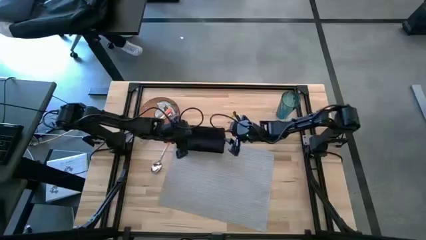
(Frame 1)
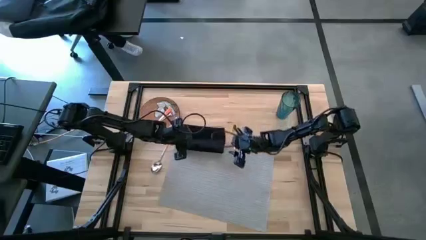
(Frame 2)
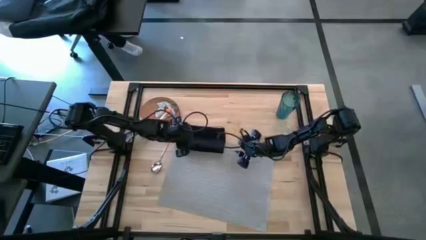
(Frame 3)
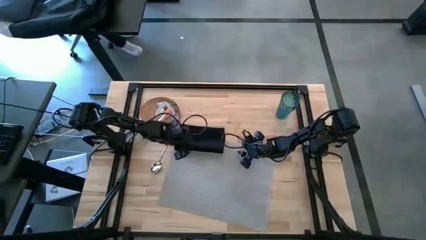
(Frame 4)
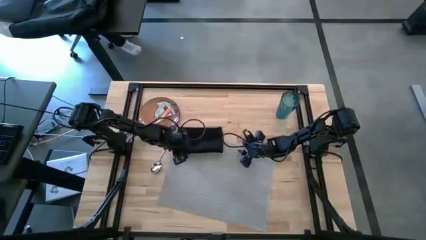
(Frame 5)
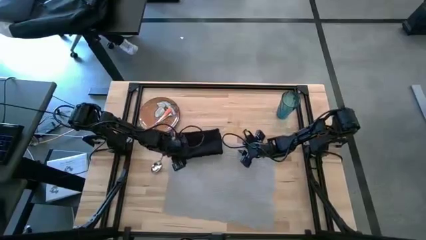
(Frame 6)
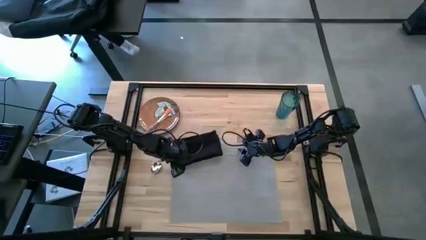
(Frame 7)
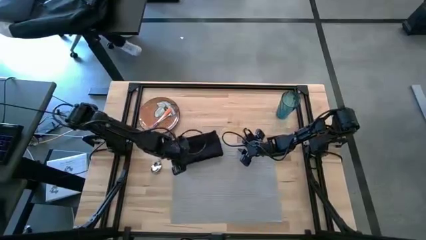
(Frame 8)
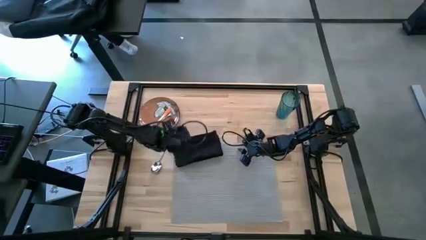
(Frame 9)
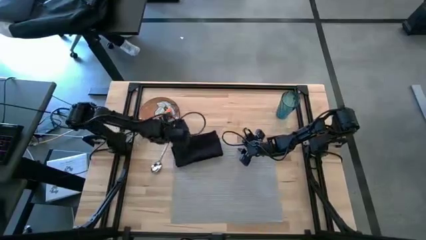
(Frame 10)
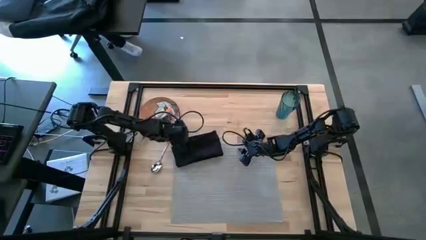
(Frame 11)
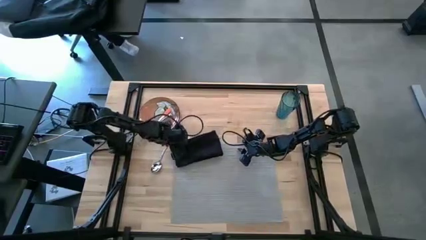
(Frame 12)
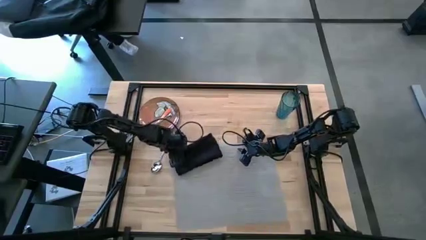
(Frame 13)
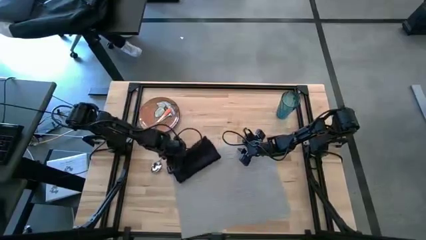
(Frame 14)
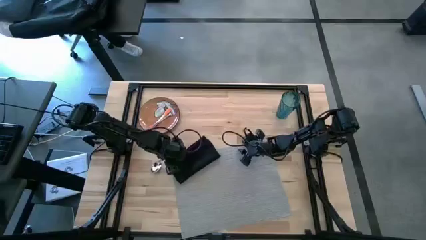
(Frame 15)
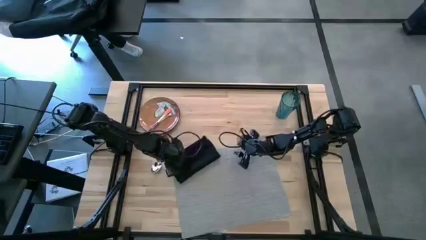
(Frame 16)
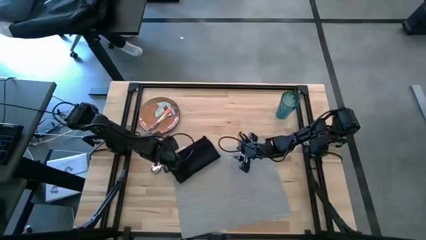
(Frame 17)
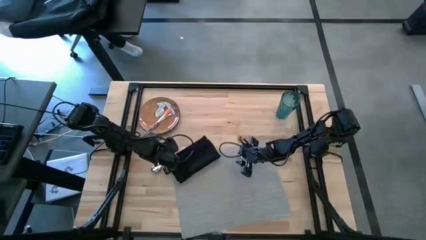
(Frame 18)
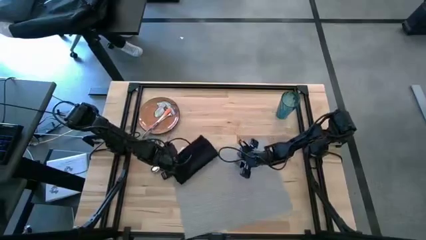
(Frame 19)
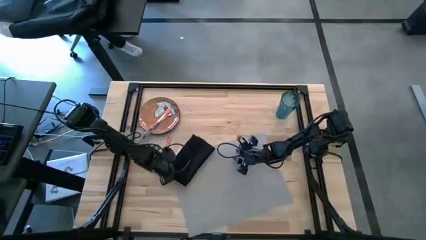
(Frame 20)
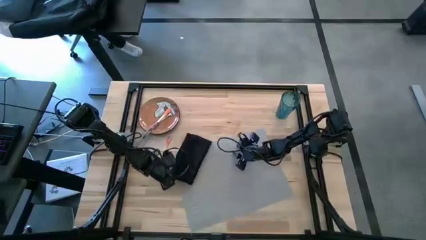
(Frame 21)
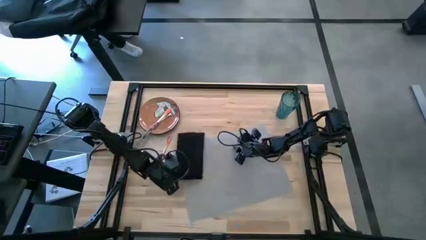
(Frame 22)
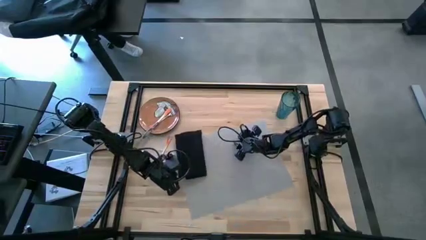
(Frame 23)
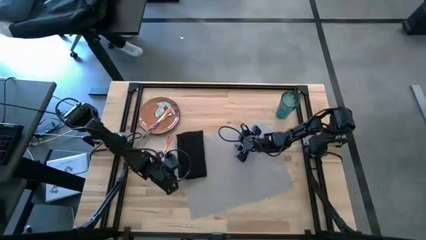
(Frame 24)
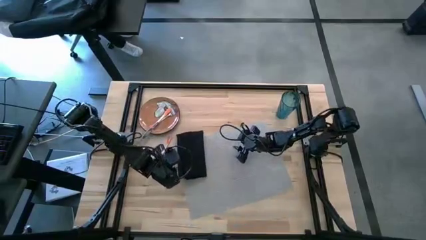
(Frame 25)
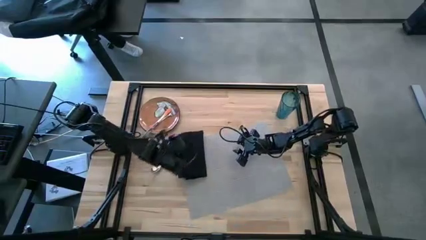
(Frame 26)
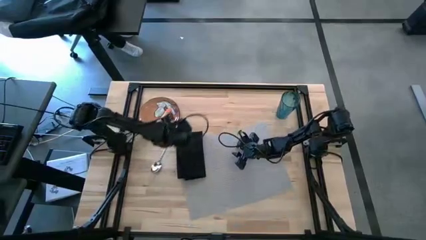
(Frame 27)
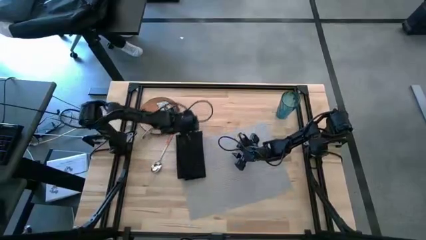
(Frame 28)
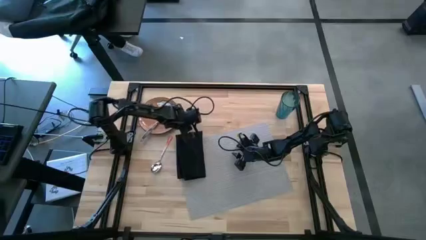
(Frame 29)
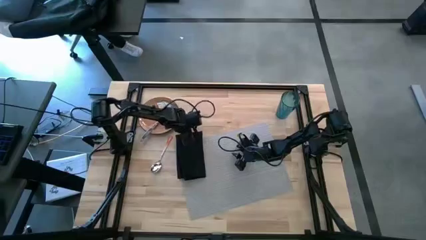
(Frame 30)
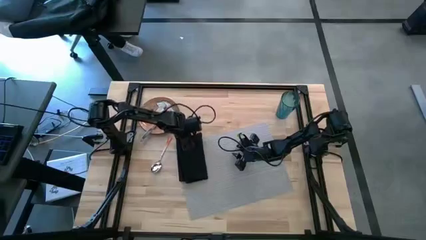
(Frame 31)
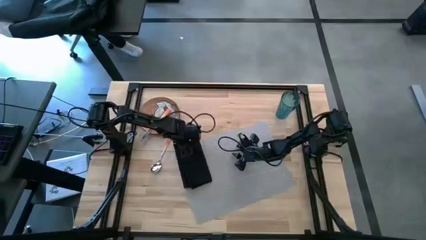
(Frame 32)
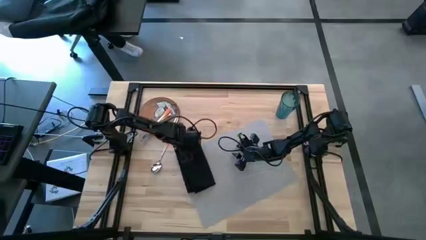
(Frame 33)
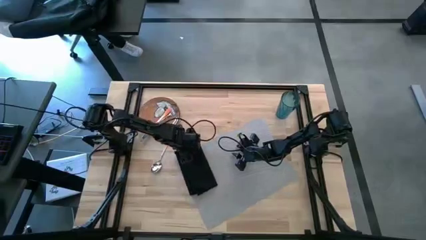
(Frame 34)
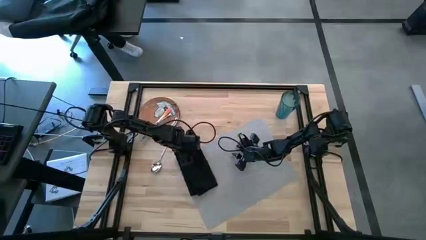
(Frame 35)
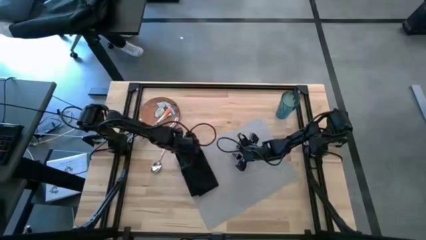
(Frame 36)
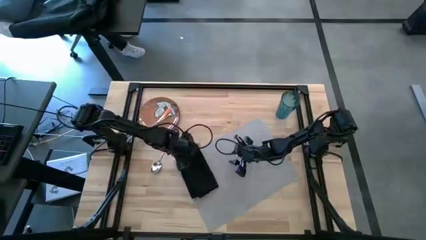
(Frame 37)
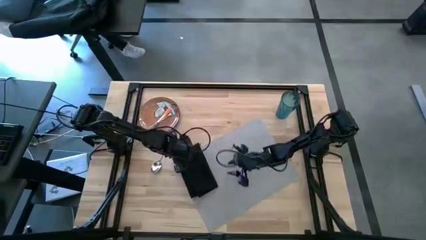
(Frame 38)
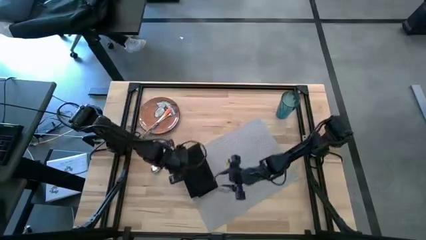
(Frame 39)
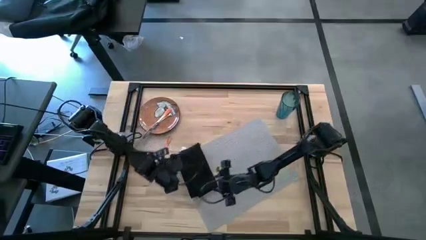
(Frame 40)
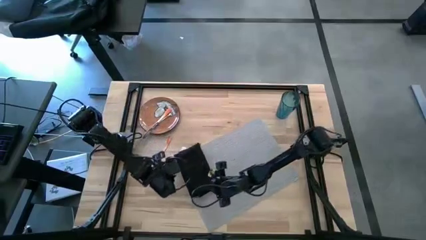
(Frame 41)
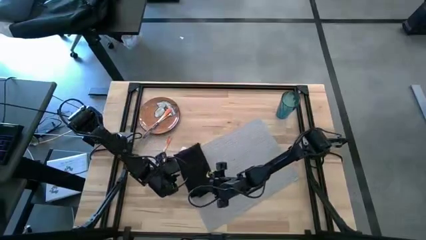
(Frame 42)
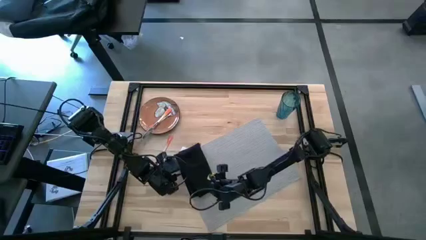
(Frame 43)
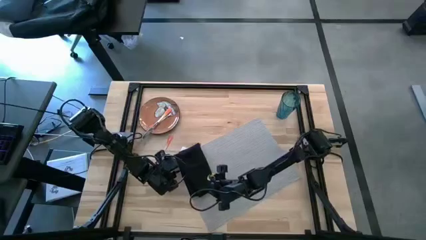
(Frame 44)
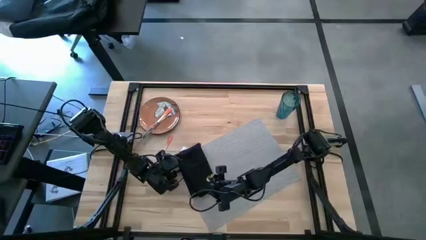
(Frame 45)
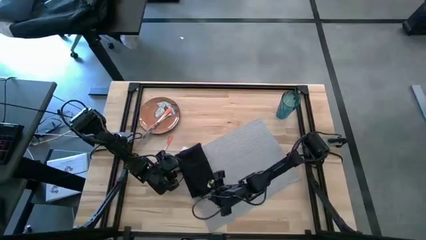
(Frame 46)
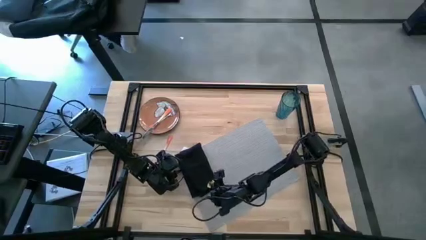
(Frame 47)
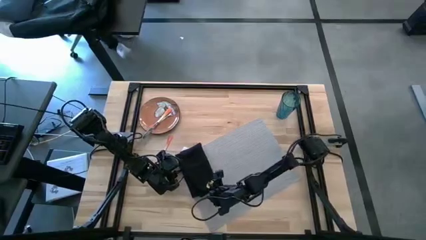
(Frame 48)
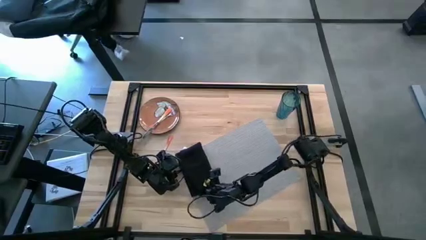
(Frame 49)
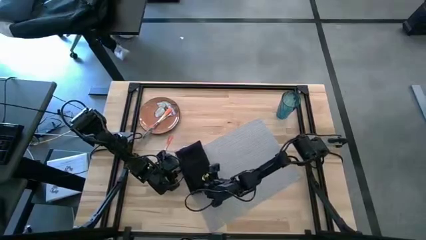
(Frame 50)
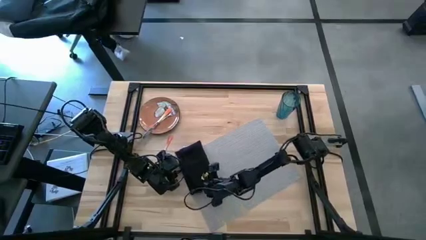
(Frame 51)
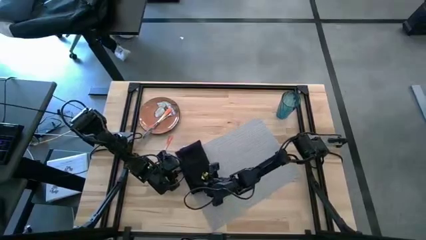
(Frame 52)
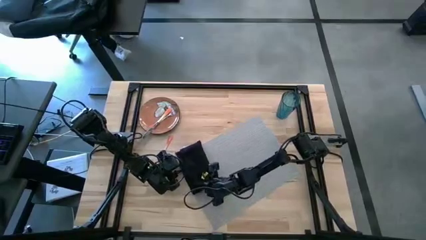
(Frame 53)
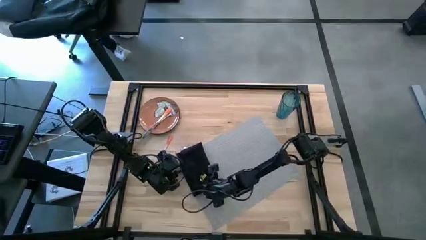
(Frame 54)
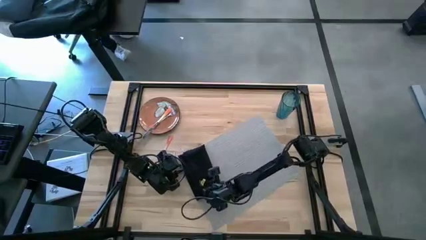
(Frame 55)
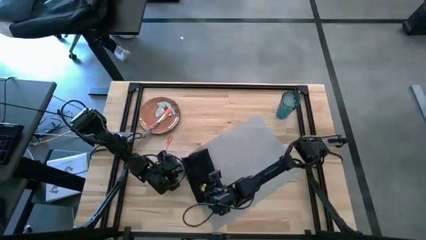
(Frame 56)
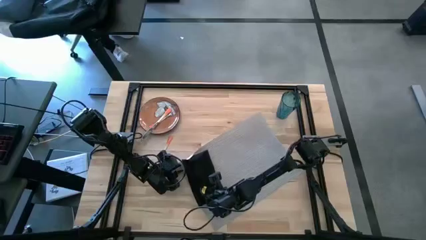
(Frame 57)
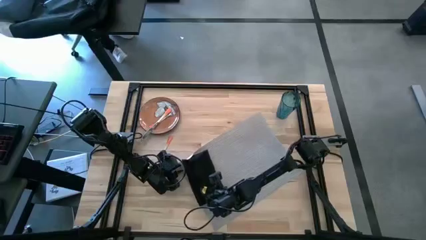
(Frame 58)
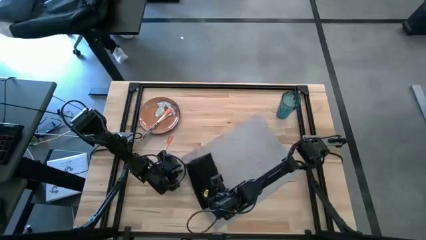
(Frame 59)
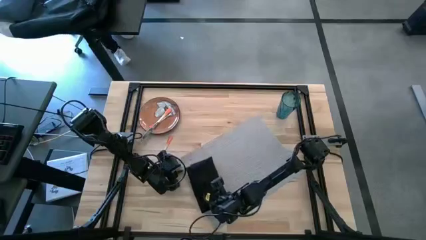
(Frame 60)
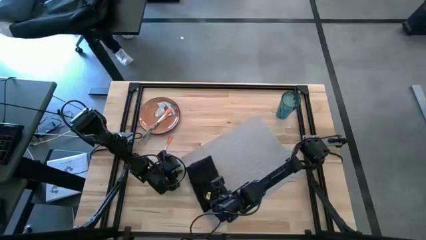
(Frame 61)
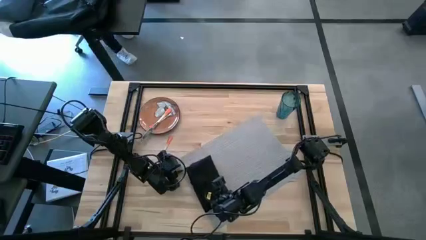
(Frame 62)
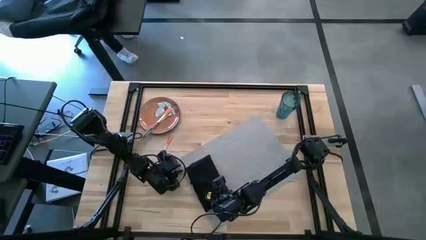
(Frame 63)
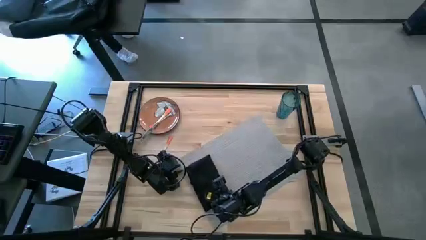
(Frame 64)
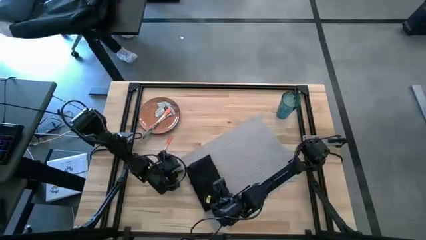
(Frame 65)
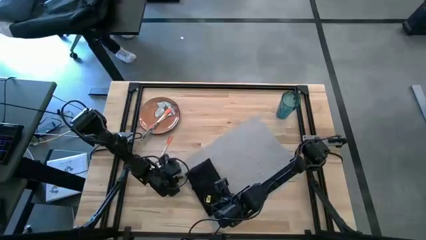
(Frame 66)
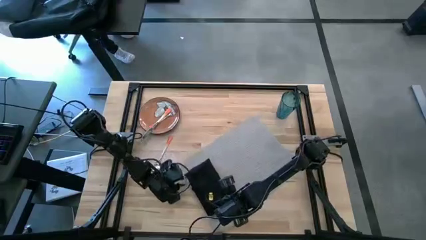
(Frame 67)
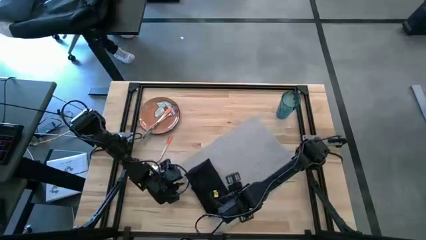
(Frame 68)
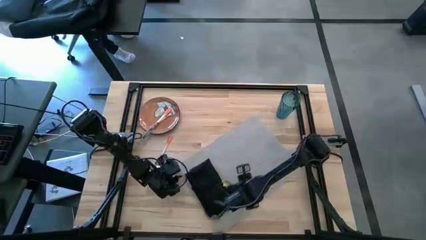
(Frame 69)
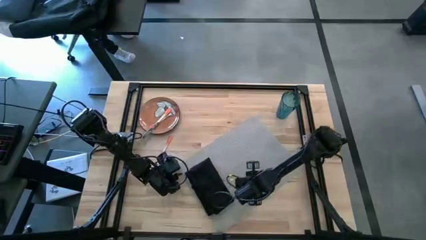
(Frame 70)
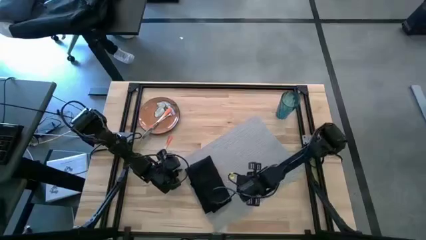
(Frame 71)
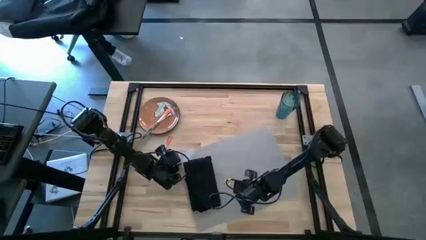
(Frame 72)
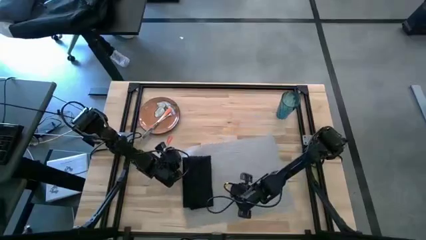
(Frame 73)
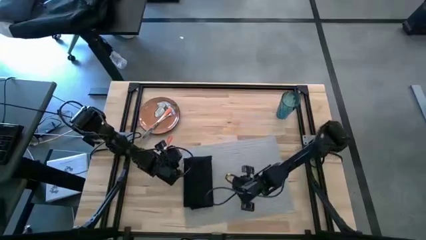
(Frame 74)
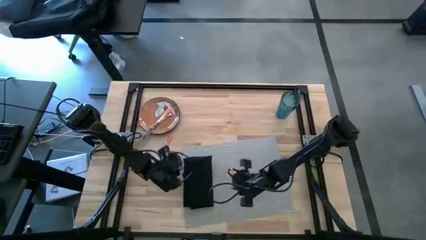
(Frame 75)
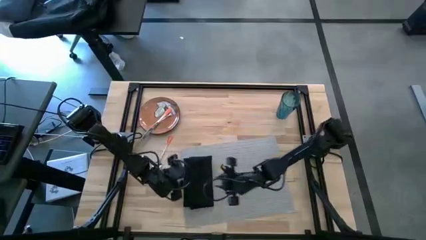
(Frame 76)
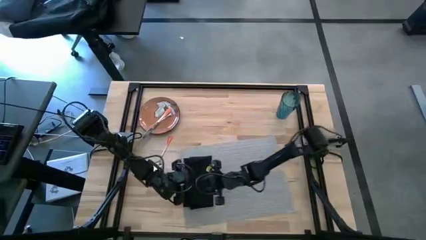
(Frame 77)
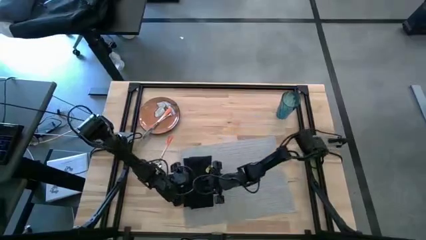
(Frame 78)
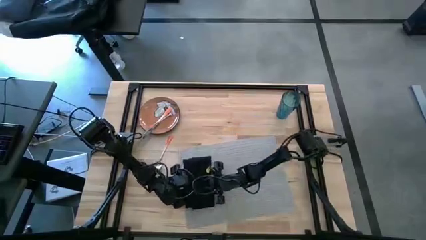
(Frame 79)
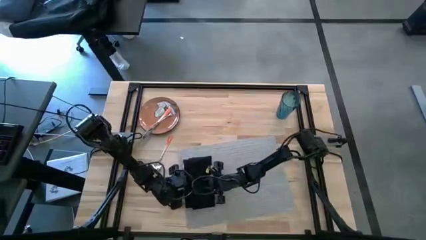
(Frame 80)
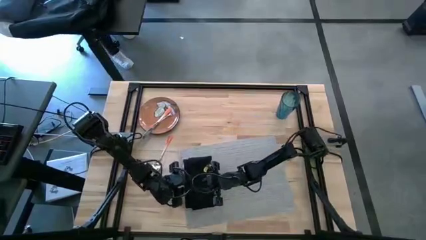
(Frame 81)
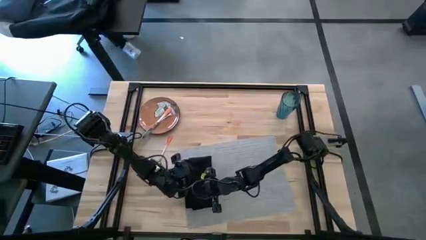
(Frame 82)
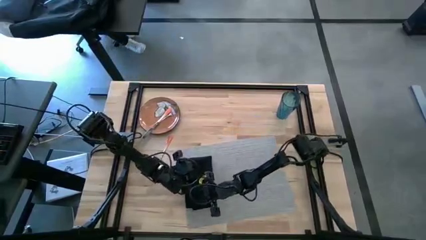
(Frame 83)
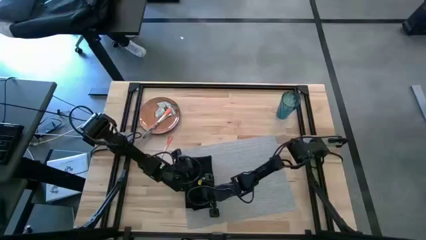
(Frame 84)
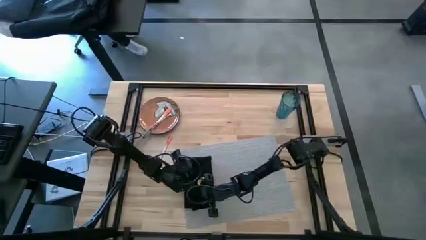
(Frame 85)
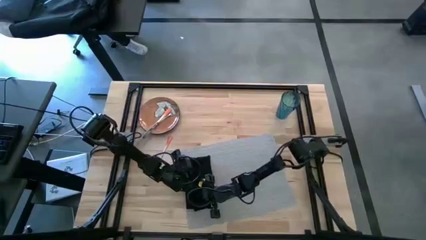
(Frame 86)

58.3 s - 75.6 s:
Task: Set table place
Put the black napkin on the gray placemat
